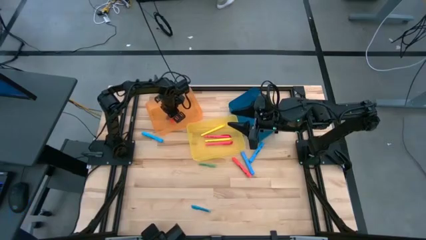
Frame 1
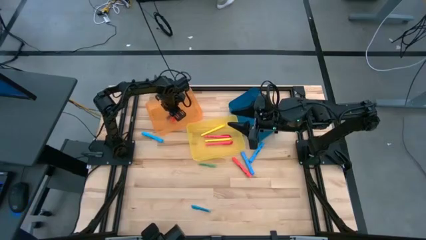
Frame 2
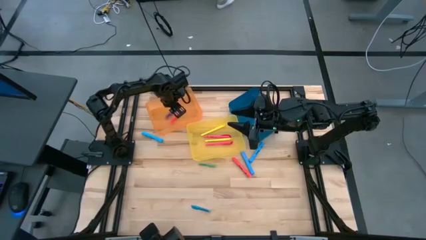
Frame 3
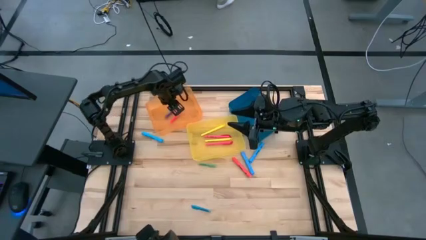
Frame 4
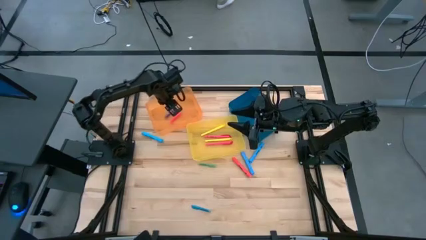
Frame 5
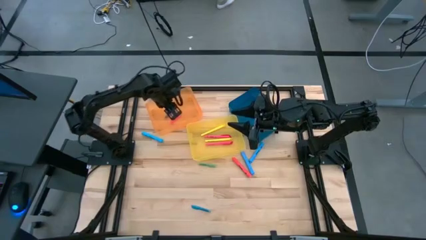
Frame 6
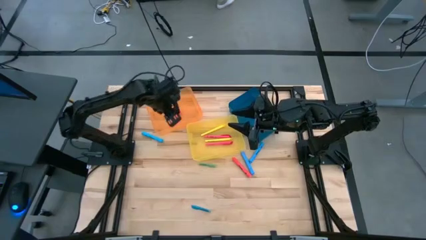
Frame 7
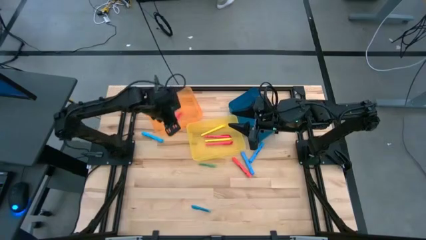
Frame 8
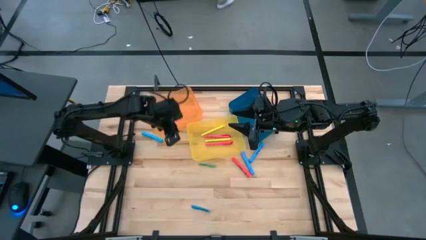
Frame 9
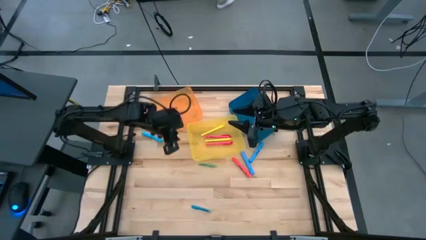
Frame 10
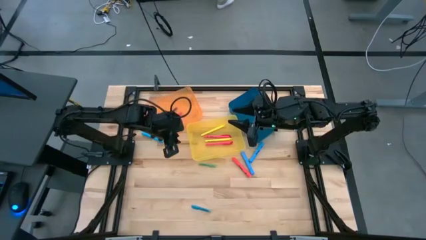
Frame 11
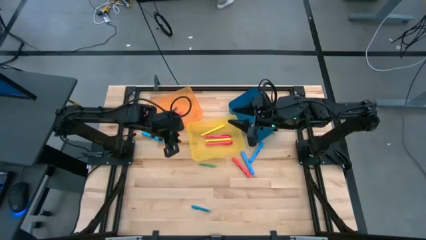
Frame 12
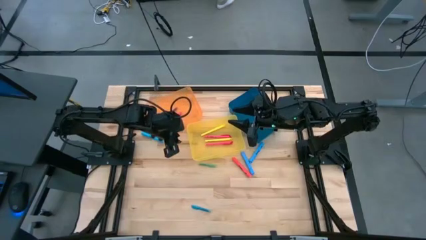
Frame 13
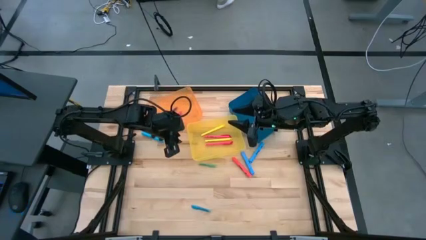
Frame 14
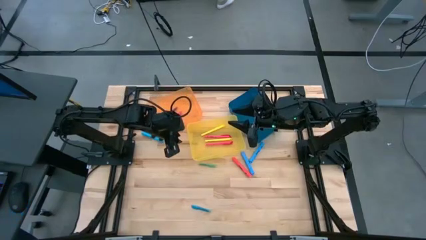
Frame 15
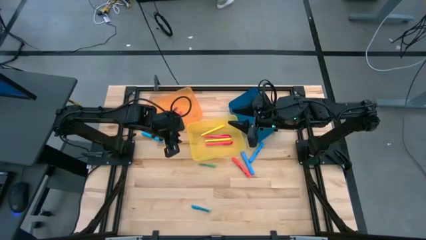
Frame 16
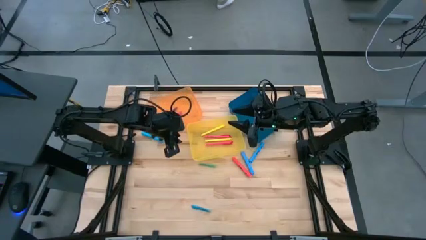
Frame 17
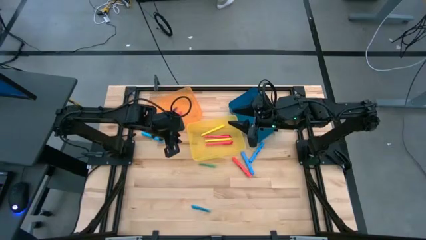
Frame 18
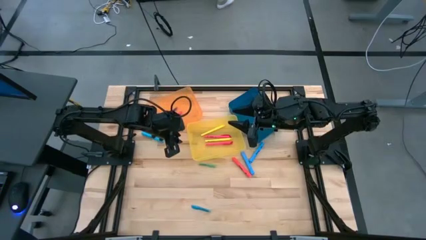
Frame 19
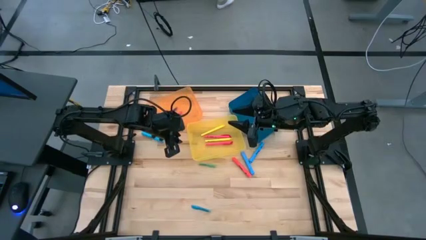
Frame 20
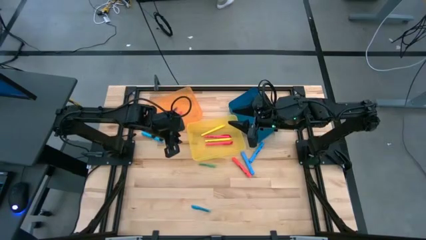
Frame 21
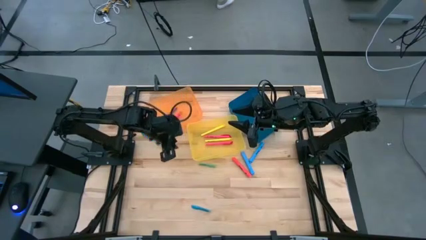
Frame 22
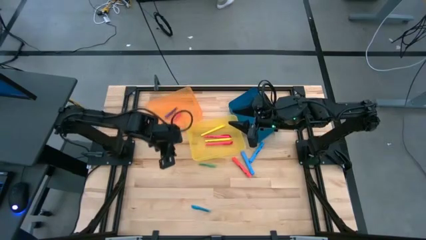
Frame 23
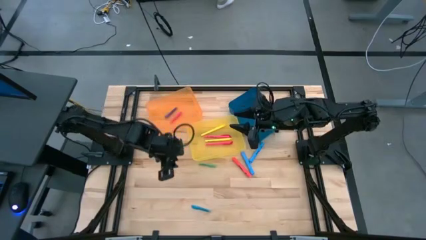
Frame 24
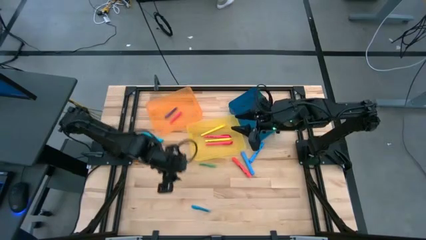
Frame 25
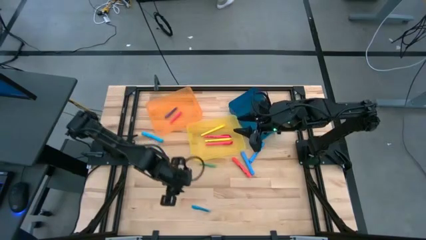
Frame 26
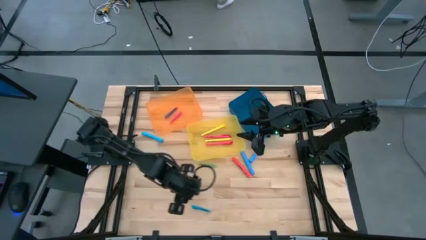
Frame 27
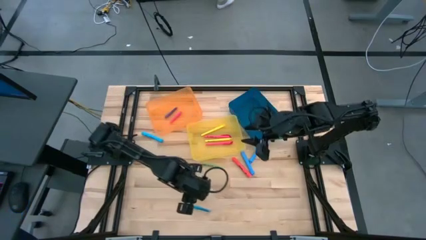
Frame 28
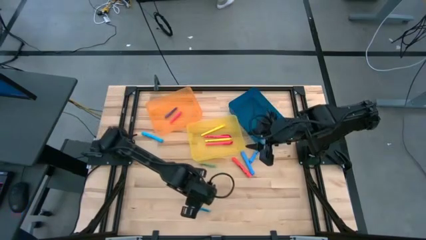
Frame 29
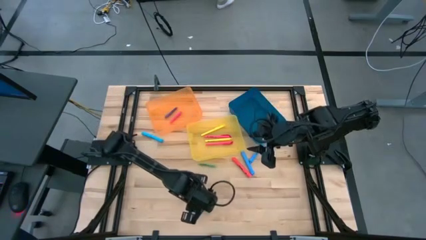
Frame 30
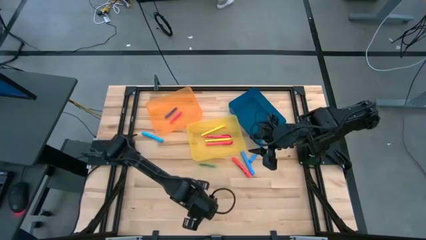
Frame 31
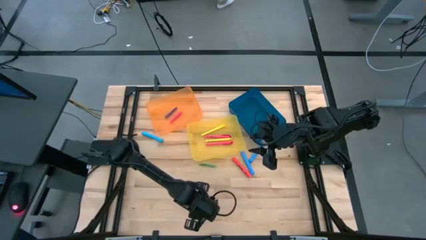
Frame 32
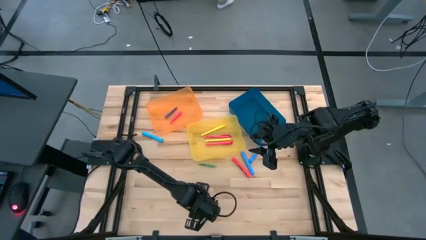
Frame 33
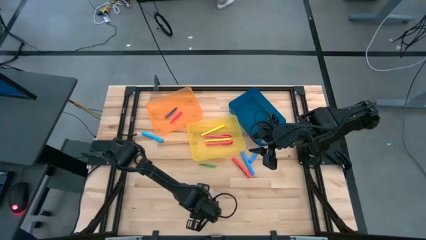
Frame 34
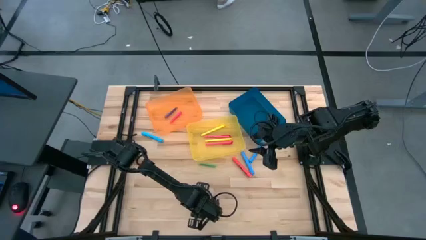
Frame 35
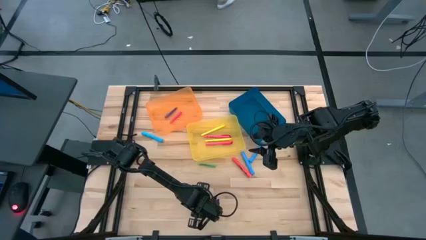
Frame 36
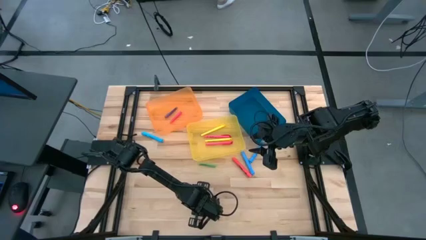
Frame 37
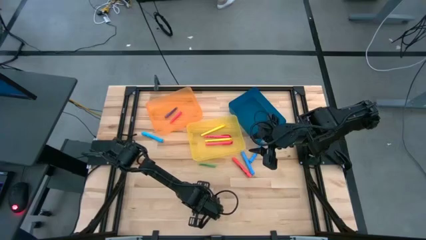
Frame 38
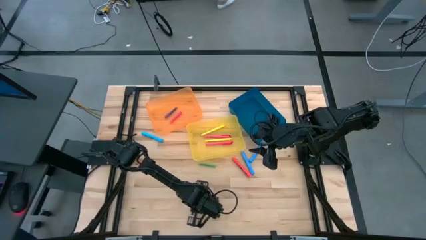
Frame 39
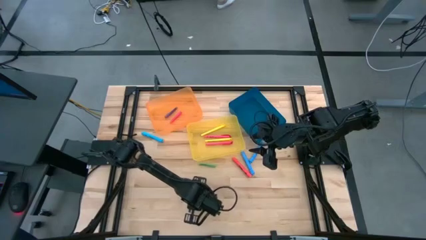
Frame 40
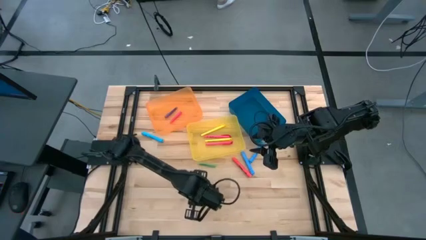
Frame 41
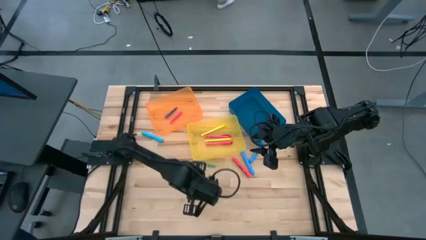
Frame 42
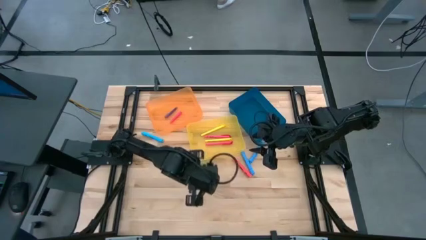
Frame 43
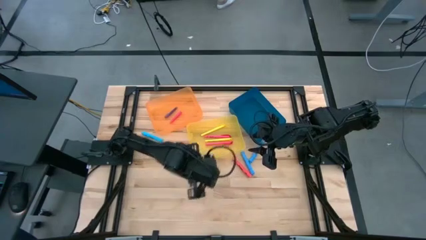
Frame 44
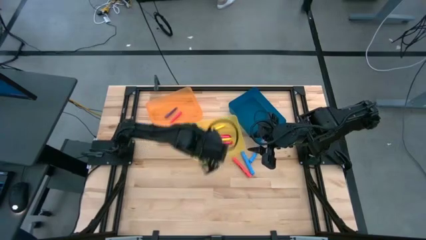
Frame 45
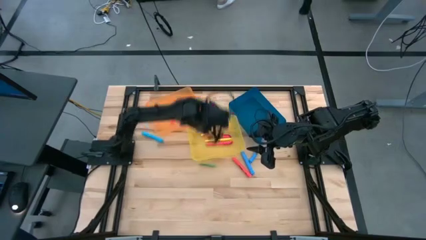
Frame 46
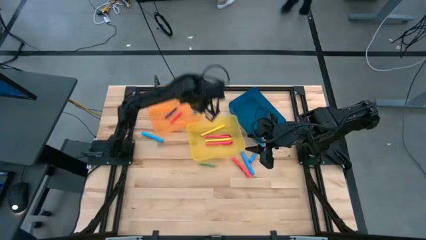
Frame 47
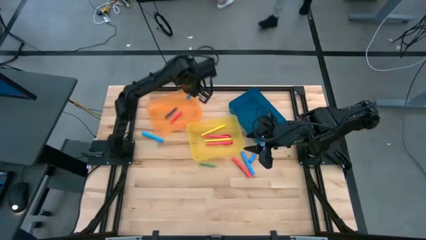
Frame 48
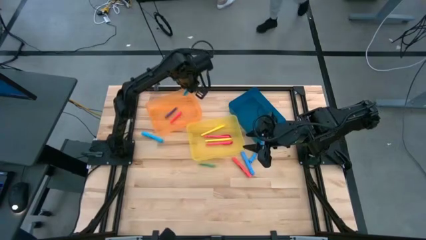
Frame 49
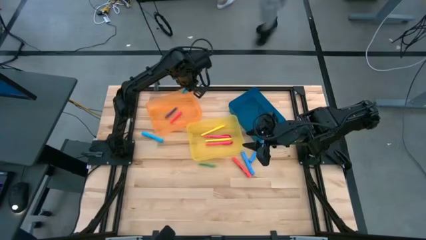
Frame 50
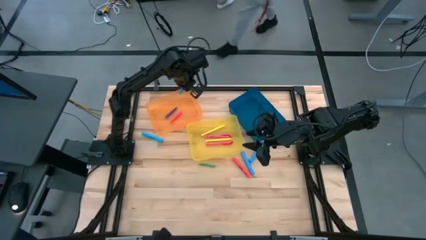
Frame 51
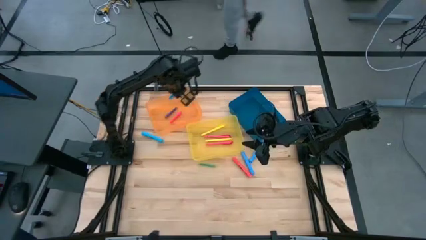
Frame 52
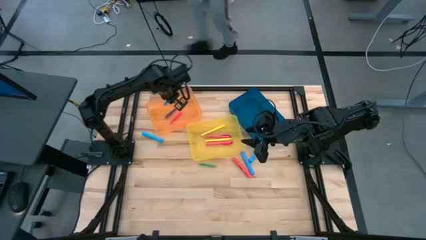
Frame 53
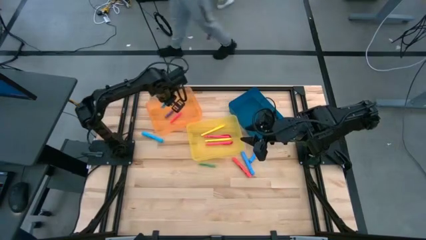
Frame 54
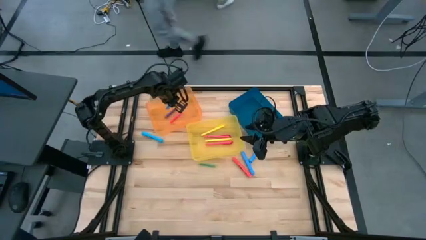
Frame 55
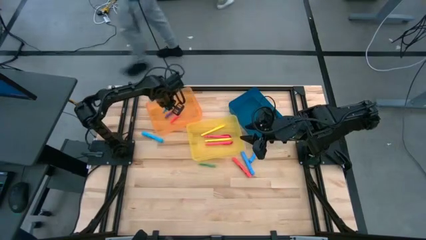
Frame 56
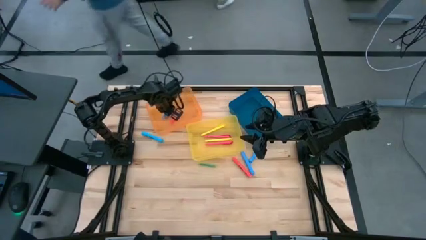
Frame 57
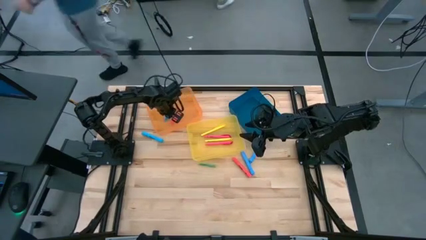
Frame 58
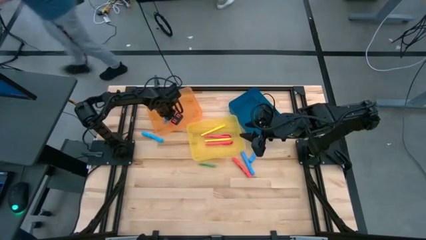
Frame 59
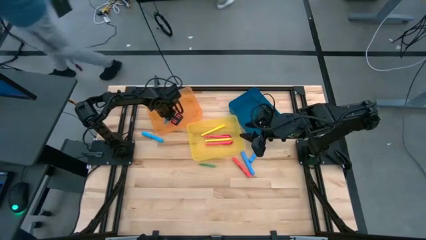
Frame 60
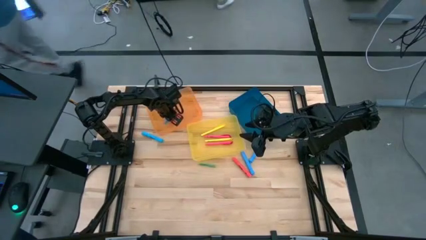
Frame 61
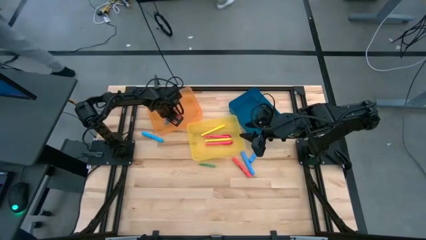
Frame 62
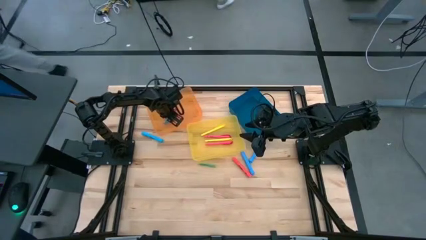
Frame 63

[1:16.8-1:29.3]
Task: Pick & Place Markers
Put the blue pen into the orange bin
